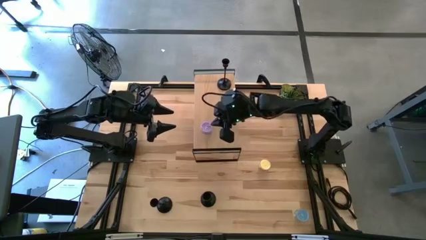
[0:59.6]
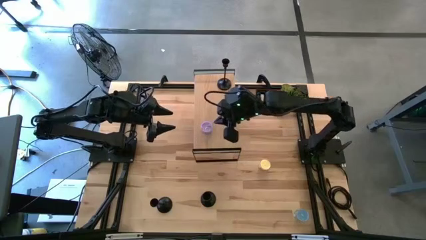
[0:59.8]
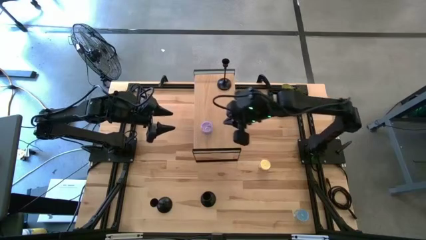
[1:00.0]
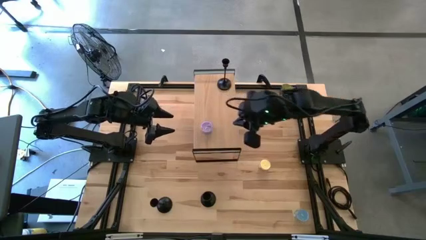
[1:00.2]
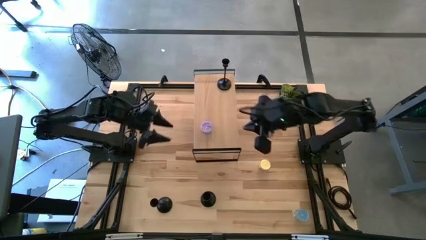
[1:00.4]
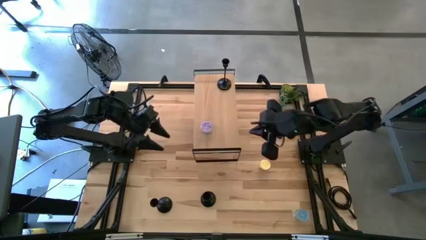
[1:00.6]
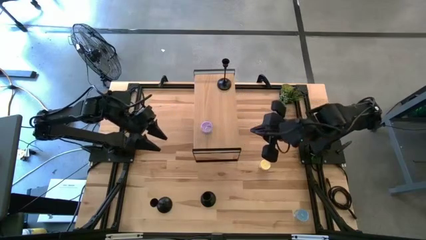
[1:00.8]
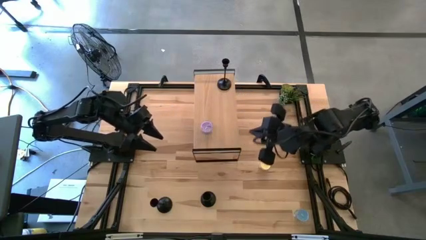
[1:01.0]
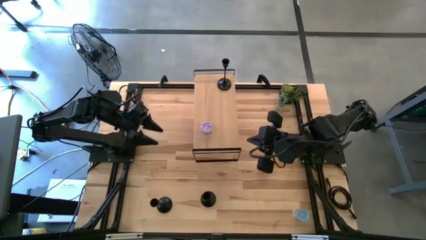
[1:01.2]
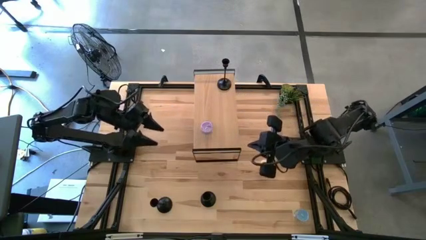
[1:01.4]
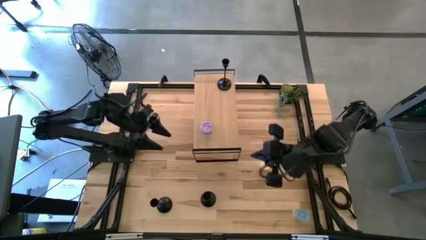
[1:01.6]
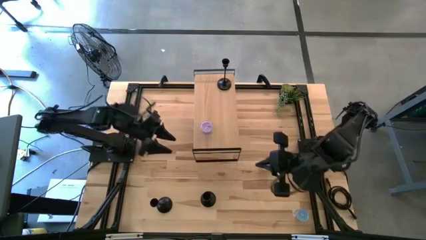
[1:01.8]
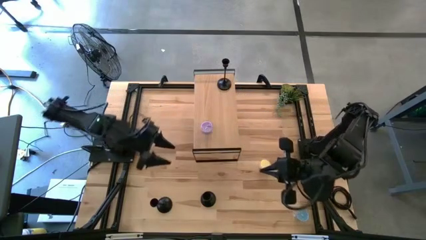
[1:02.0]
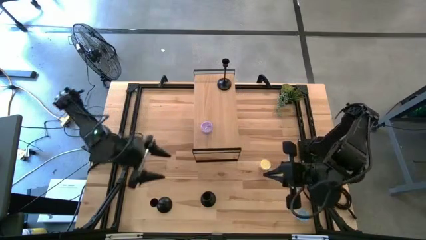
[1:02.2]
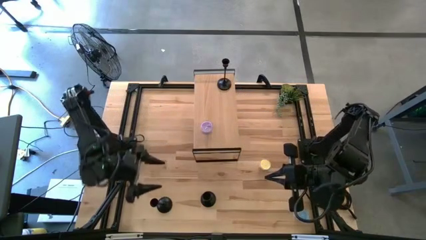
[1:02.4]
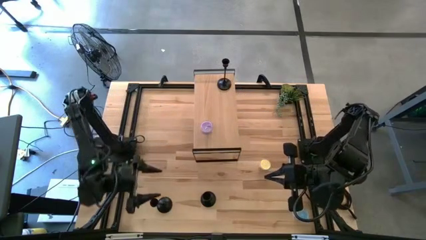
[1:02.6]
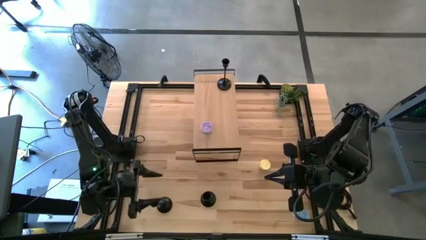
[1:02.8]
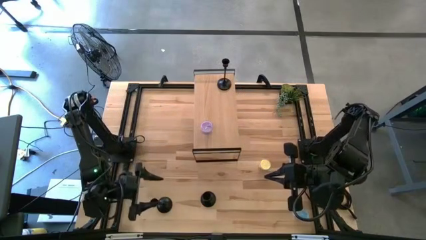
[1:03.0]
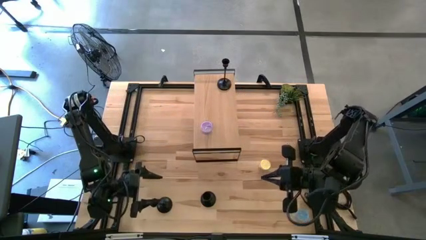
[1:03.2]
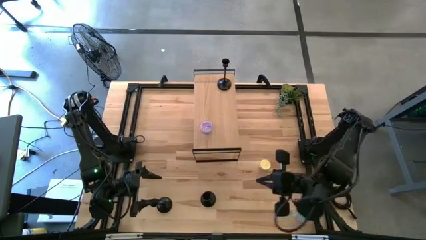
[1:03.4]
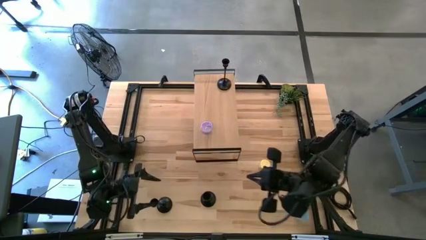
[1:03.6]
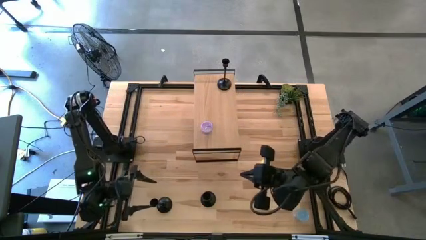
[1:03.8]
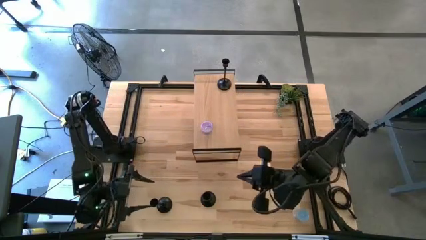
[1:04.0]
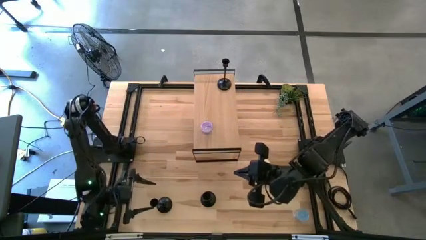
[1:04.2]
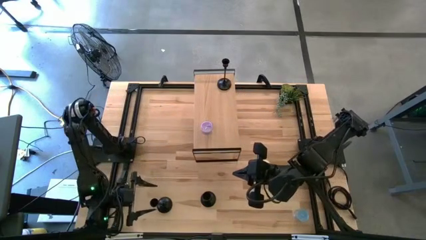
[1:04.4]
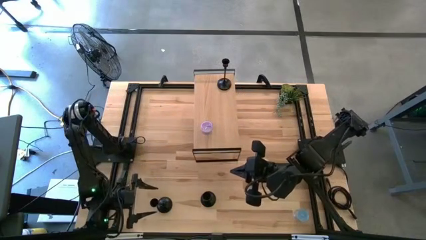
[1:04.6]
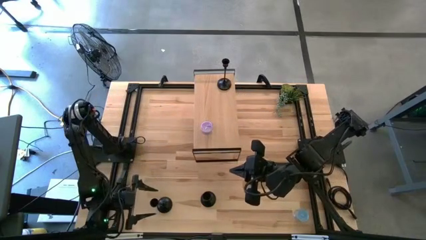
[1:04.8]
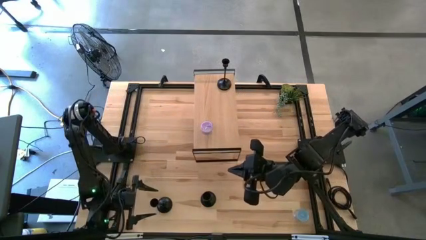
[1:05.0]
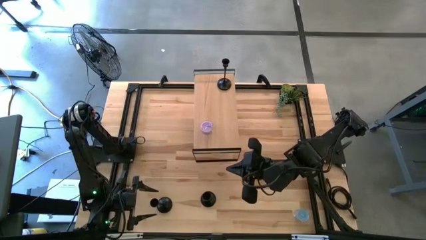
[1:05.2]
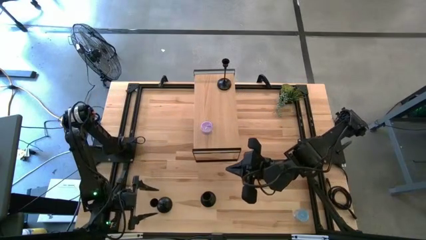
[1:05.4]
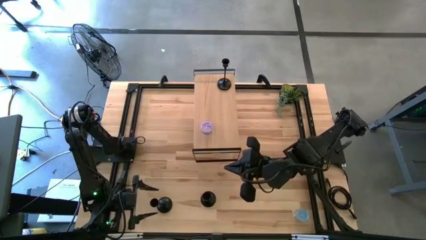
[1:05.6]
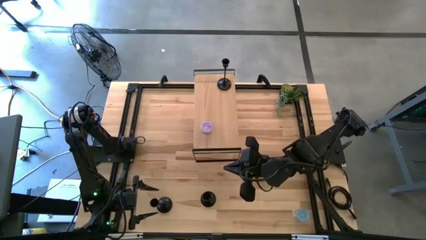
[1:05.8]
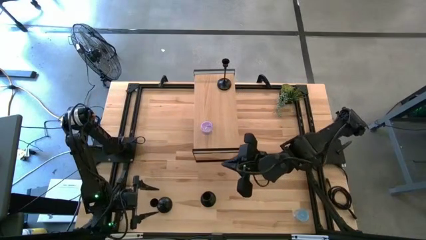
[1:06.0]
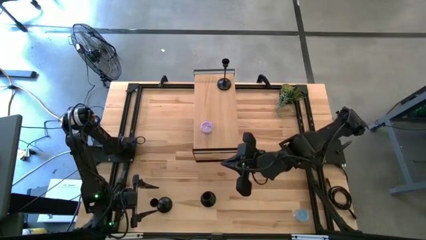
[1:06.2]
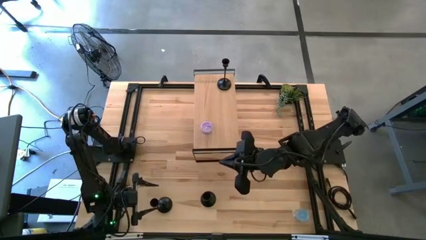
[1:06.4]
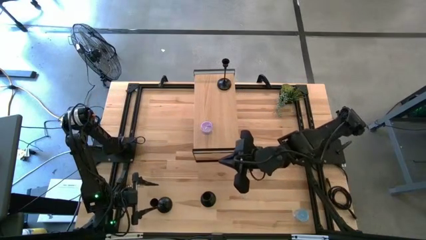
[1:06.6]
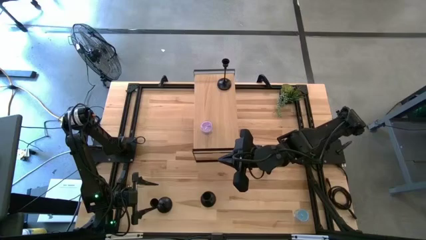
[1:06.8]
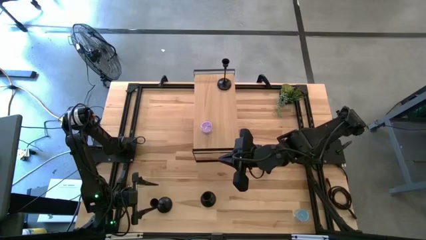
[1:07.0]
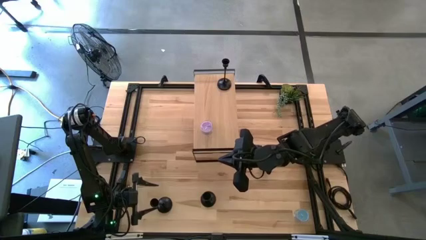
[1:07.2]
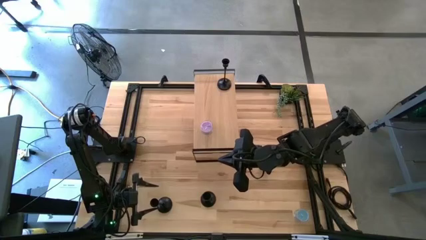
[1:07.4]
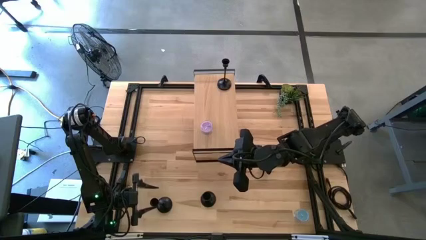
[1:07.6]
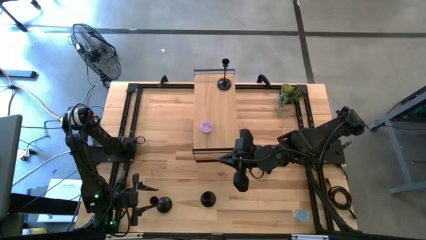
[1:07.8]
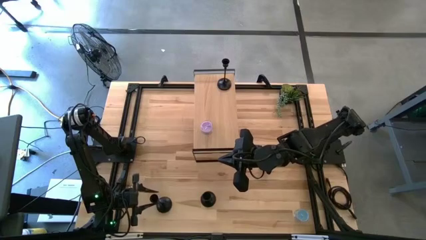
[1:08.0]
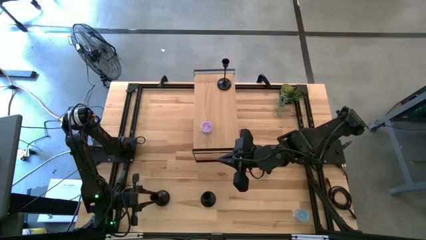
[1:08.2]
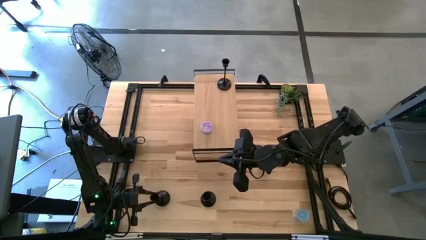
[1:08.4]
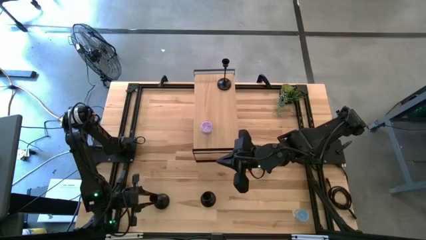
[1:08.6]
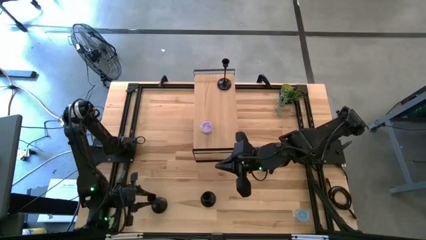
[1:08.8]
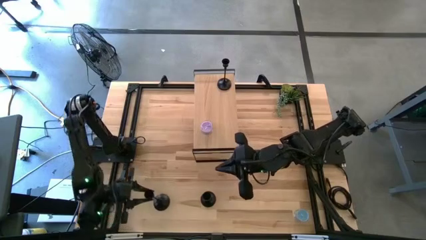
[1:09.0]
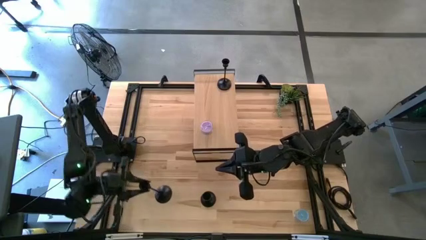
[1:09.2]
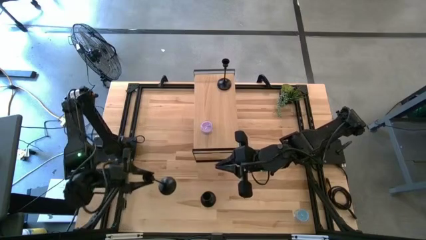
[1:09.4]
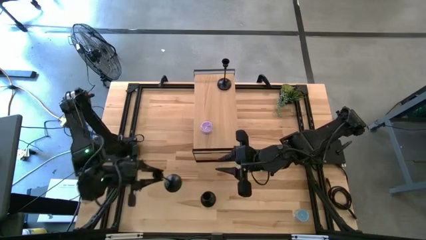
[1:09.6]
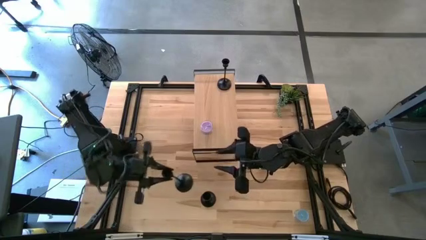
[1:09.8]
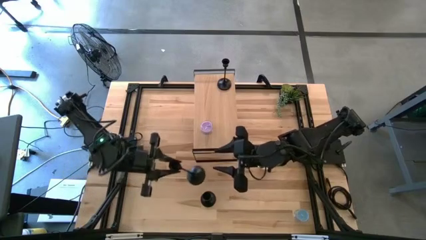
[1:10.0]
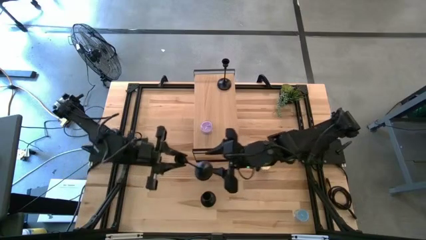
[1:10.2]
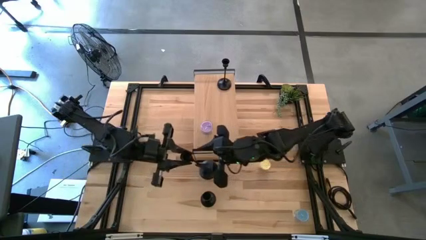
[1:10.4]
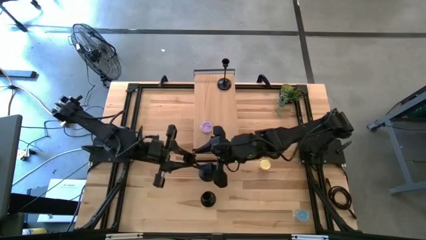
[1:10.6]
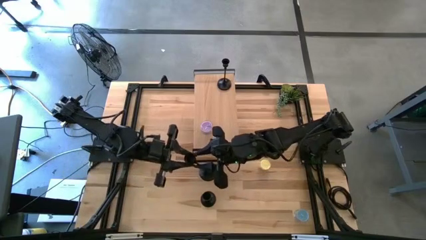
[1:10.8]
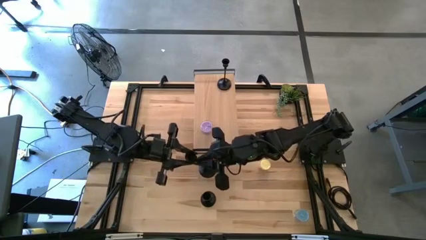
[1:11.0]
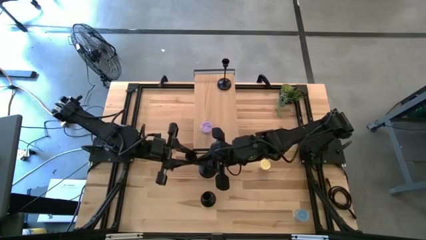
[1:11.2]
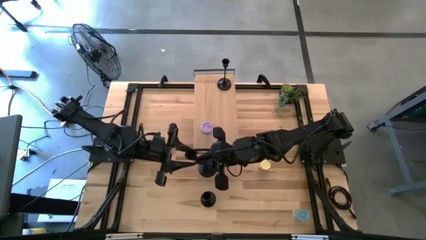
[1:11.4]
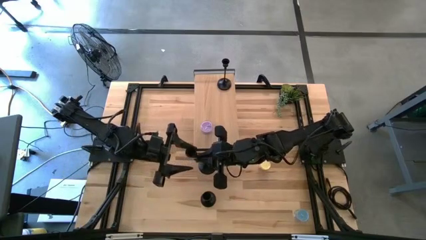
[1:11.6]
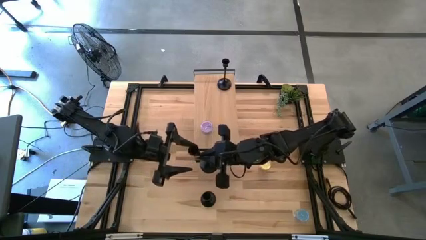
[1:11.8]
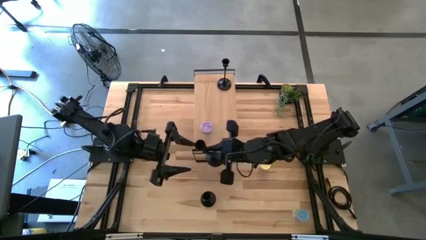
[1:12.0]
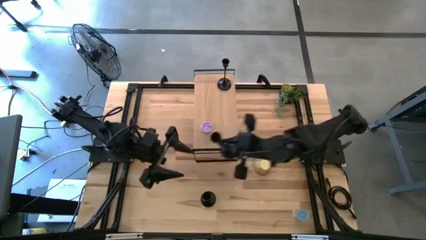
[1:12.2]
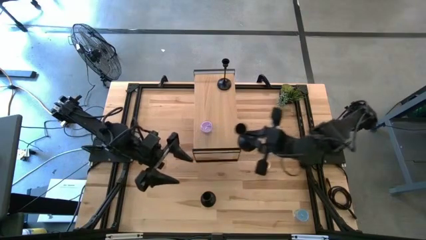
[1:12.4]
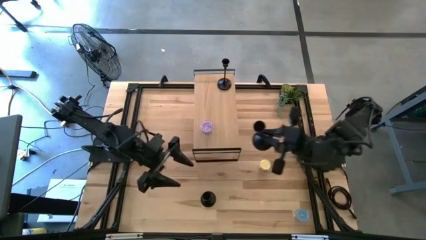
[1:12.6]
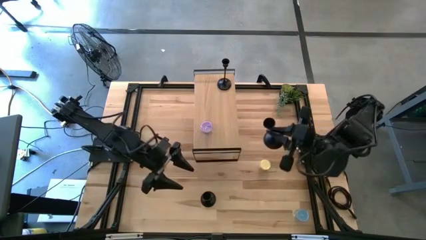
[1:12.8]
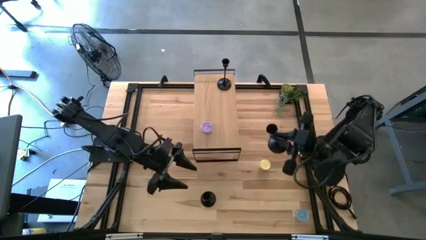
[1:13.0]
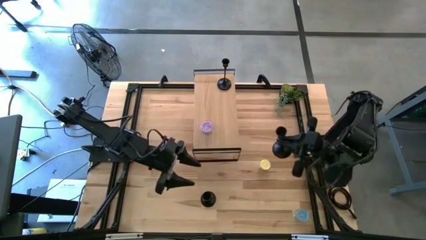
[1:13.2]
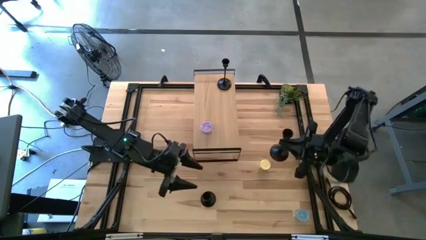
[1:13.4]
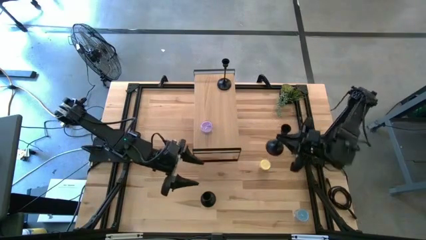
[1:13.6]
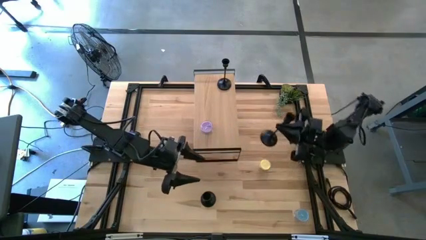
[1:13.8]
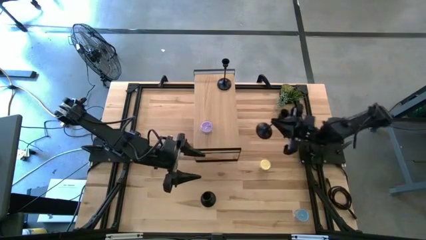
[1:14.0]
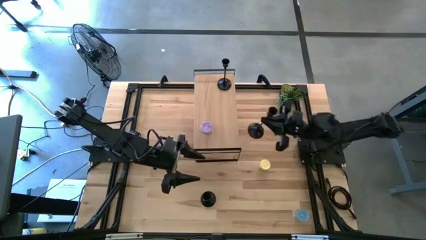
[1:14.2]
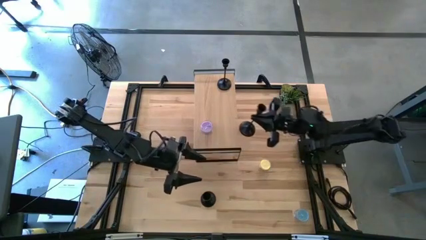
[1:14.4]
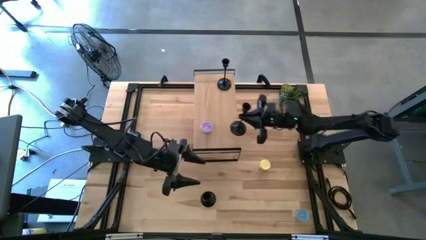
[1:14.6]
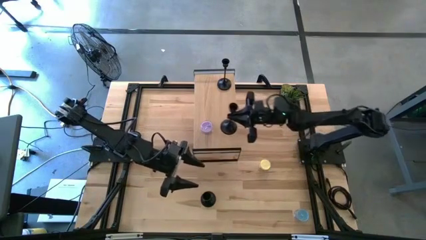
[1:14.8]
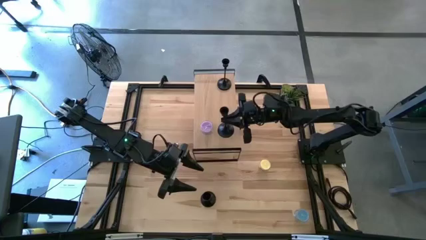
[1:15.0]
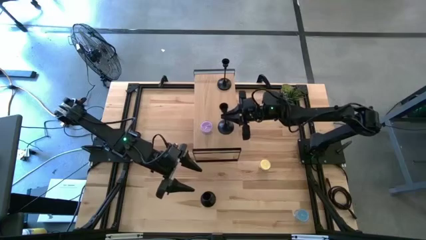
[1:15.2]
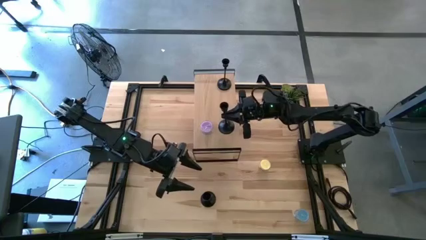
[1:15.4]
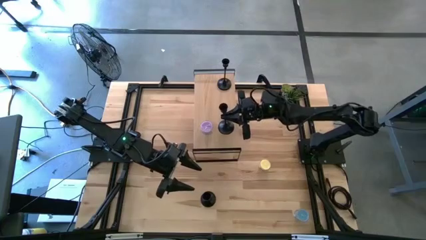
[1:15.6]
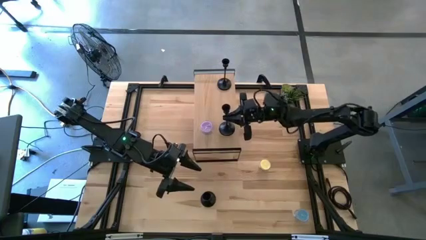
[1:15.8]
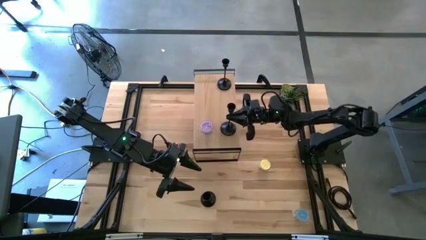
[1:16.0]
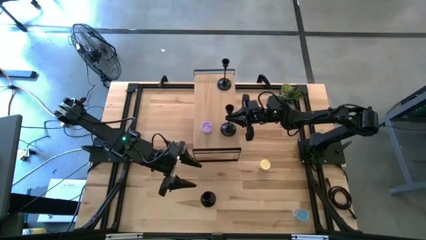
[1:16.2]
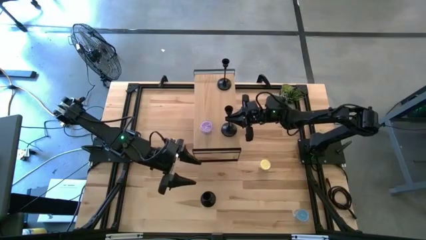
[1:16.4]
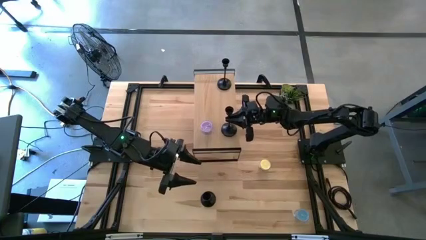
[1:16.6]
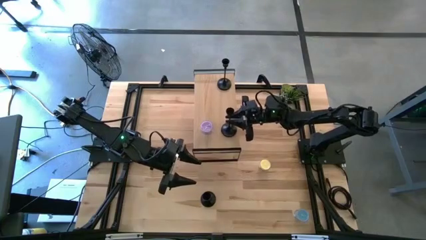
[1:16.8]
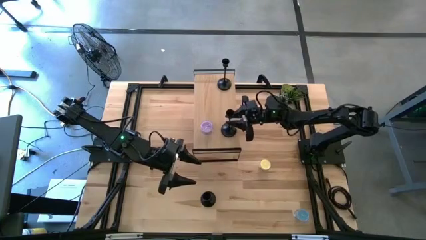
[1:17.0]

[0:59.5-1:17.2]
Task: Pick & Place candle stick holders
Put the left candle holder on the shelf
